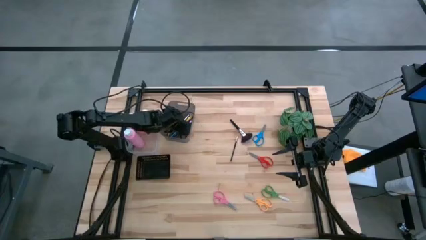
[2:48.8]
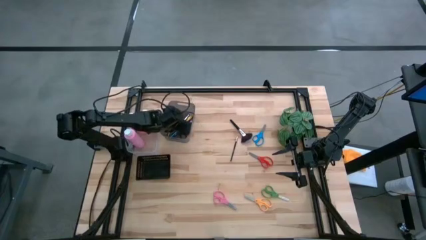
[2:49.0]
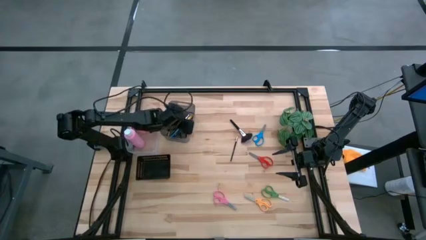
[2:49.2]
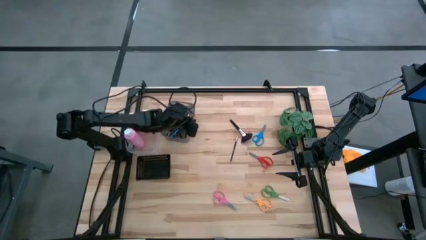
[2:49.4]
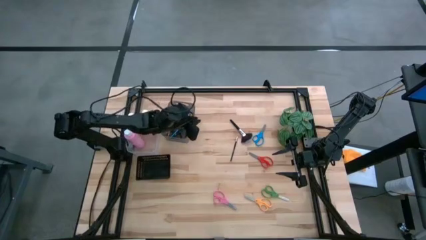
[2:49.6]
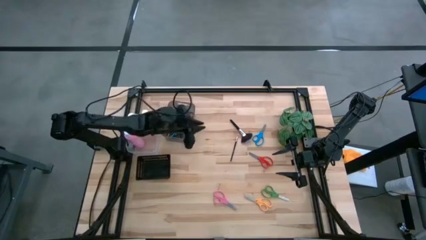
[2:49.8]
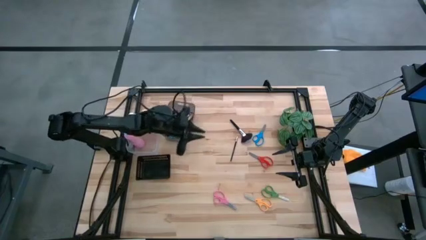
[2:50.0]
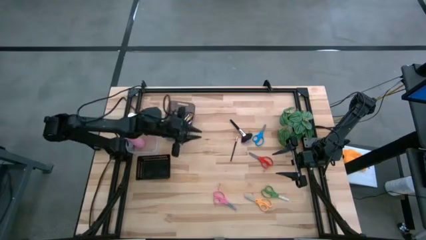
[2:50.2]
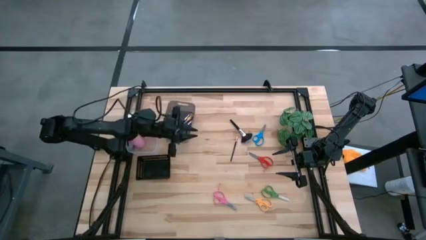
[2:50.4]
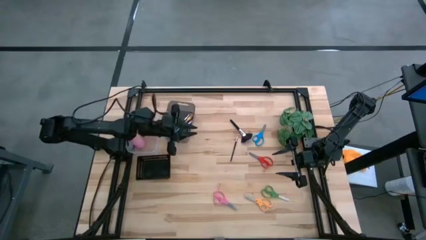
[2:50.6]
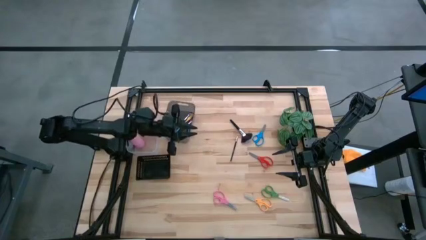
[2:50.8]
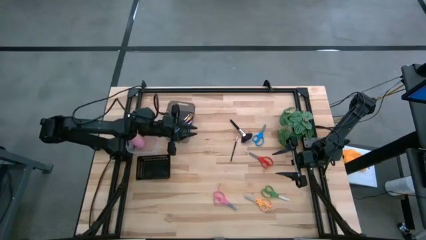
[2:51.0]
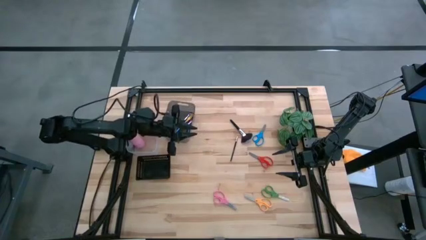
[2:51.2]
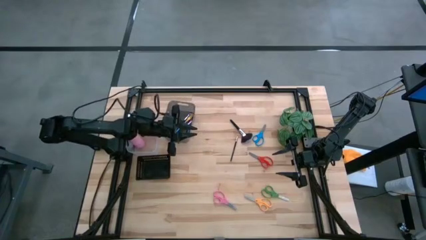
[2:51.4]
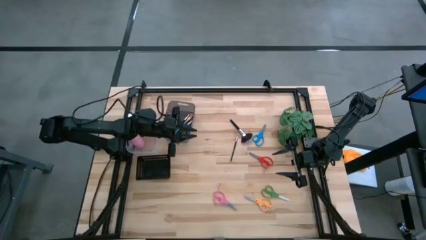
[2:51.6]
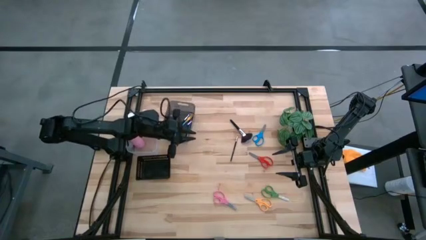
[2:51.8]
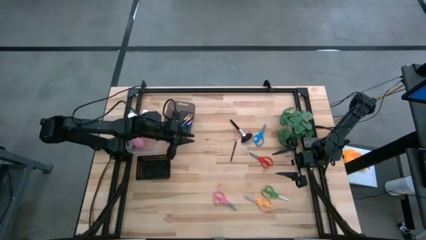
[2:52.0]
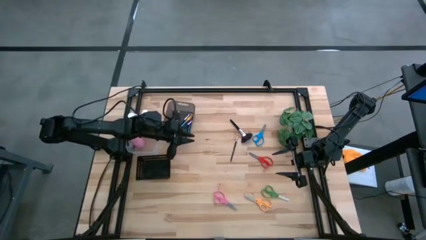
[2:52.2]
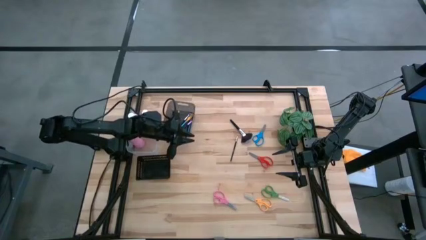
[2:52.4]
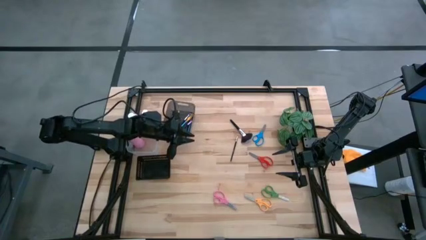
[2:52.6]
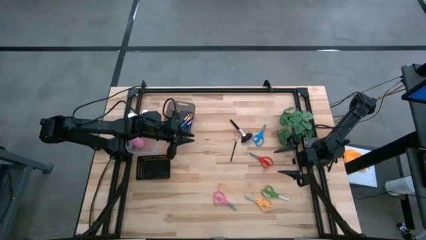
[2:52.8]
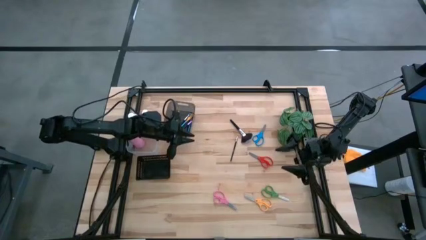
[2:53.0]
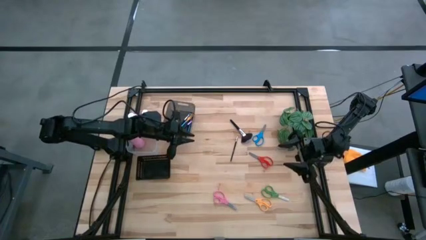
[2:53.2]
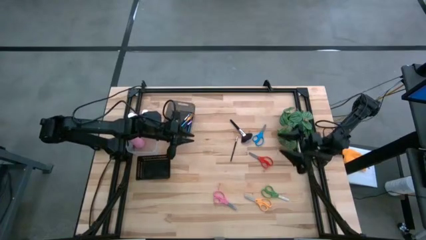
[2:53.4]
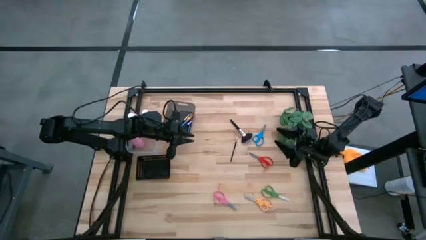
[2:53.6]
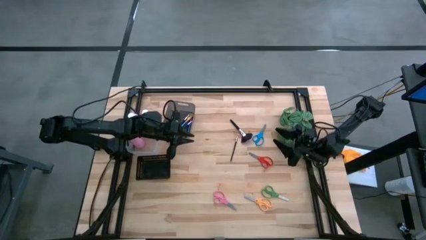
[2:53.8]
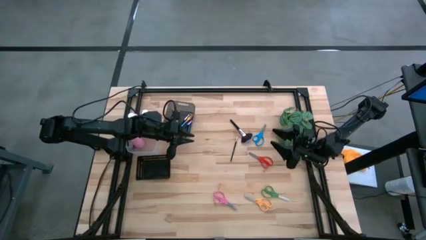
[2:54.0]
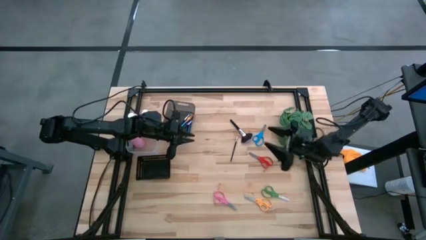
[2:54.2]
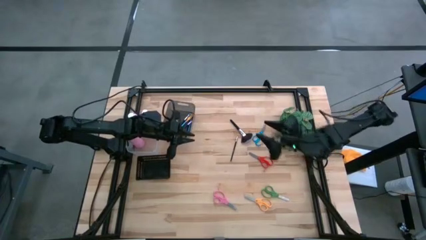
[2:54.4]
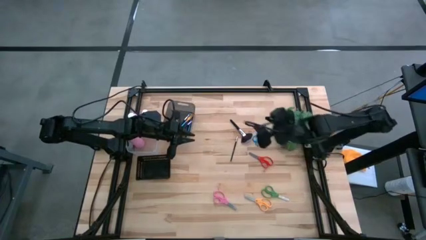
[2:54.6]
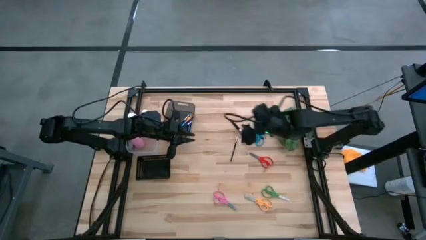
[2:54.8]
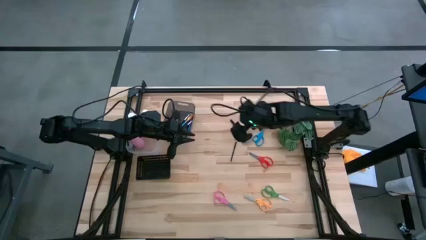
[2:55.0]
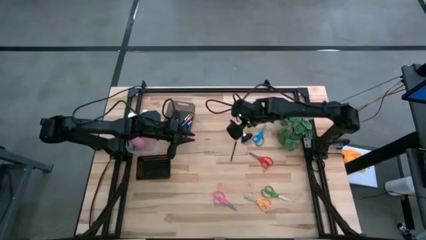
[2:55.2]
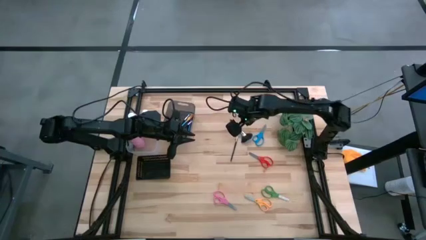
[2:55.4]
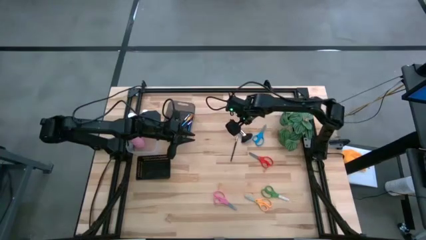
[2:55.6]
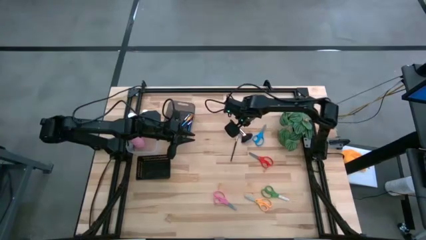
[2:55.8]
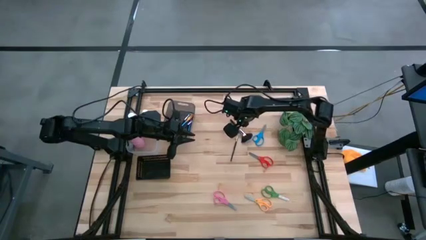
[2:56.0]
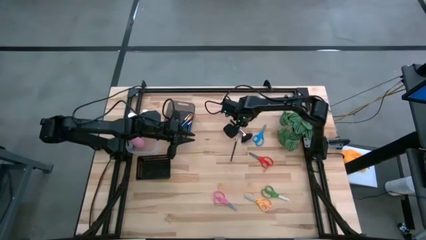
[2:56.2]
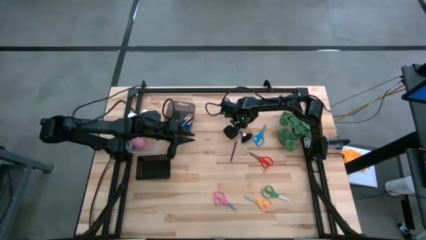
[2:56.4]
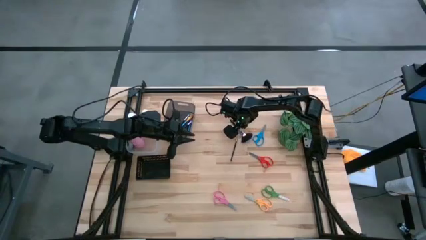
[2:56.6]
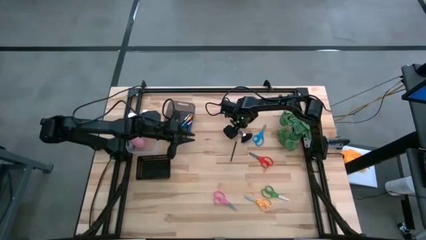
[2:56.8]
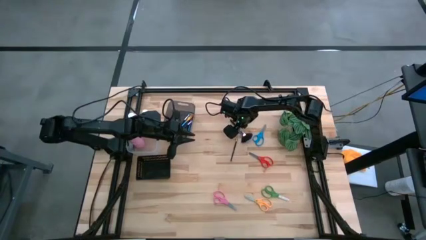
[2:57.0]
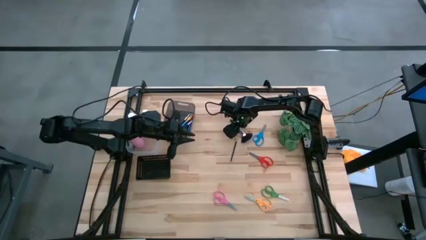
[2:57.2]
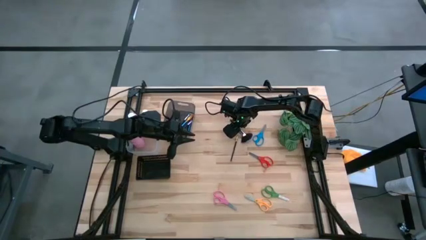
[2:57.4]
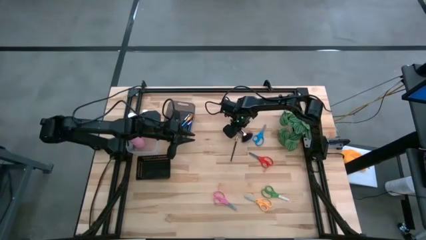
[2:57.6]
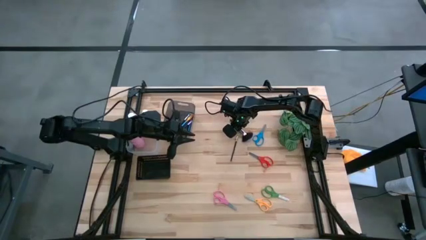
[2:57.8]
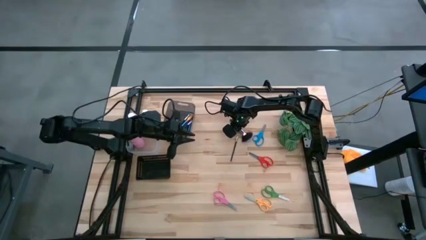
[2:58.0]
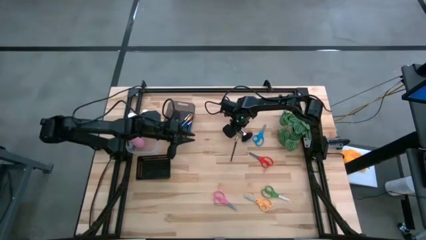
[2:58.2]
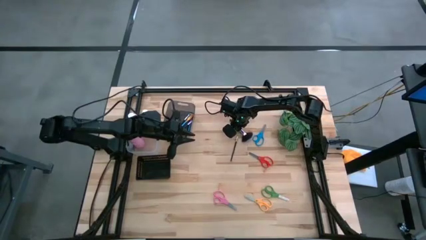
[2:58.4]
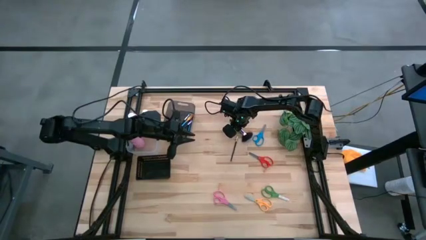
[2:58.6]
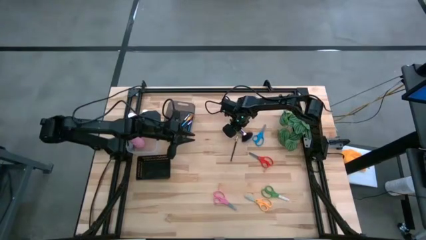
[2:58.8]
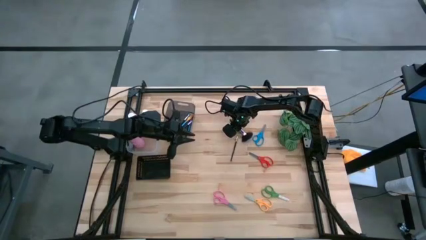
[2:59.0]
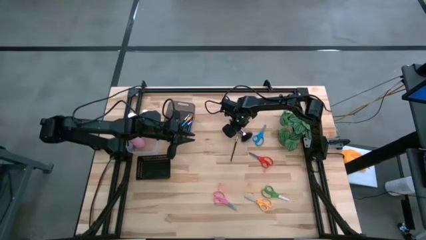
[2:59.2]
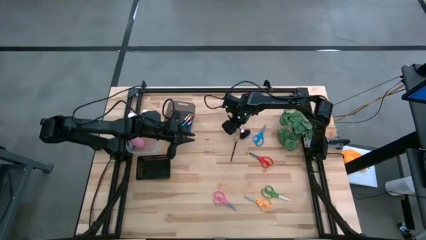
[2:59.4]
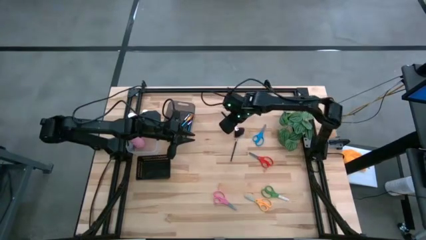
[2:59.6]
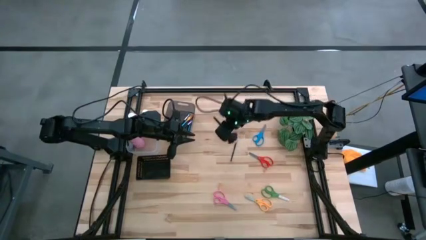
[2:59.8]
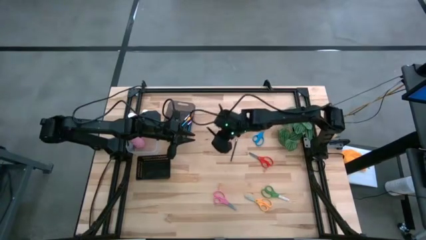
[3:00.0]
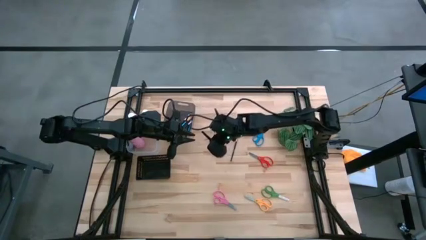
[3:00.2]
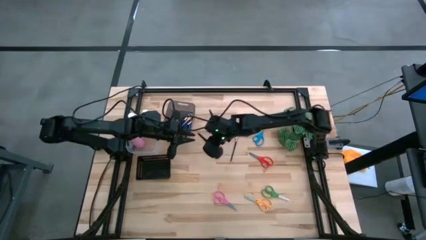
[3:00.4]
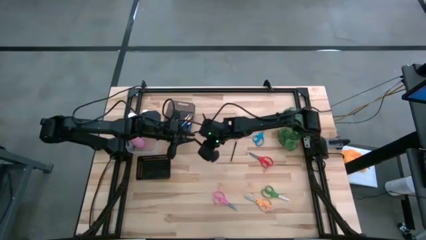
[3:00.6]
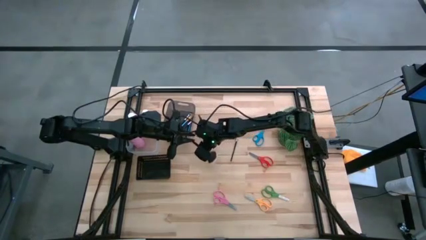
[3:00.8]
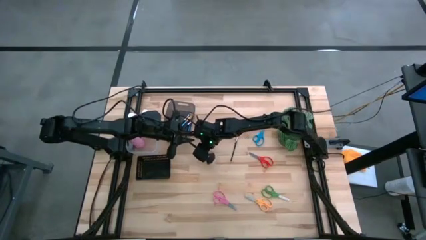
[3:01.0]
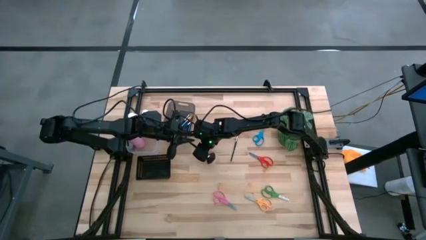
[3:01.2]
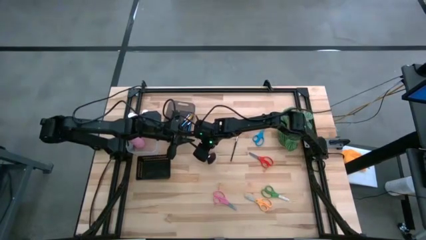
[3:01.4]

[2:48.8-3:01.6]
Task: Pick & Place Paint Supplies
Put the black brush into the black bin
